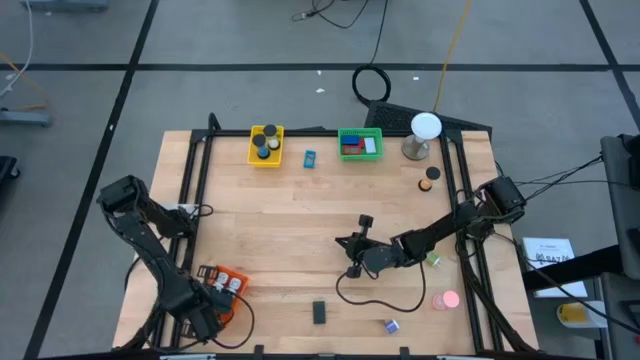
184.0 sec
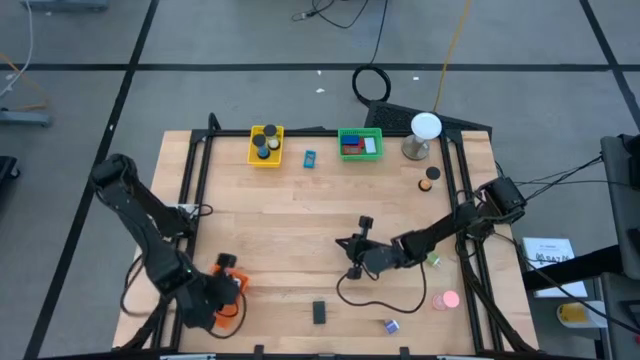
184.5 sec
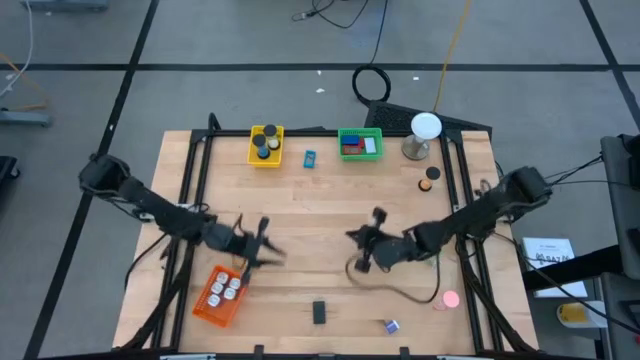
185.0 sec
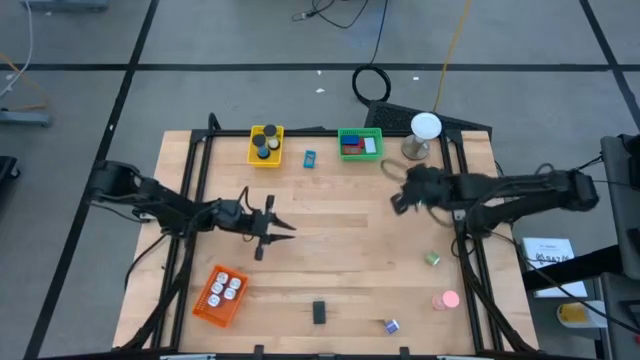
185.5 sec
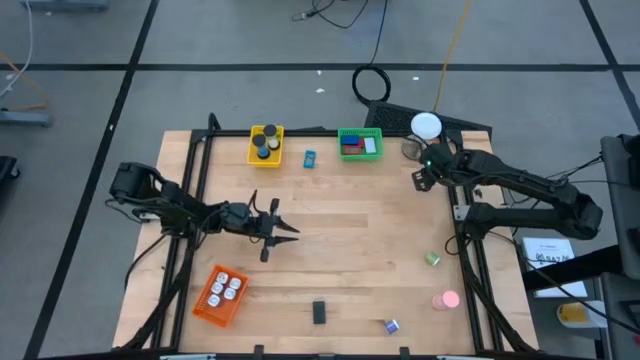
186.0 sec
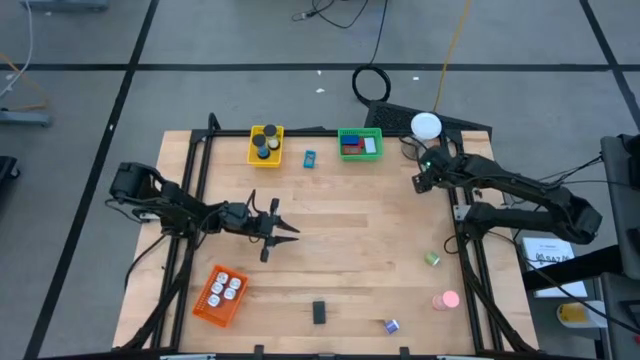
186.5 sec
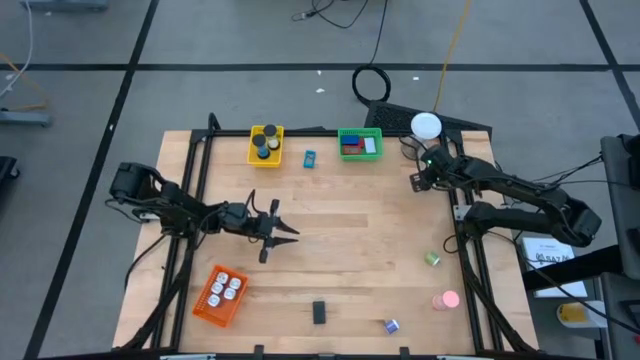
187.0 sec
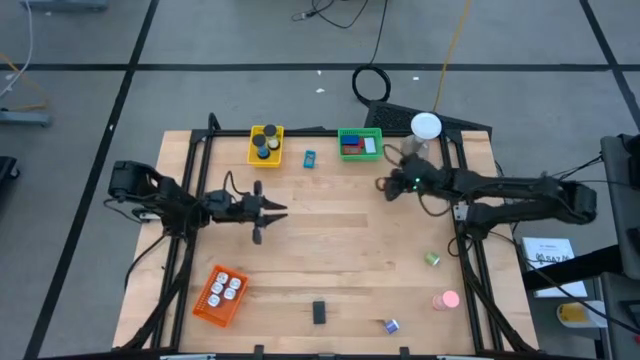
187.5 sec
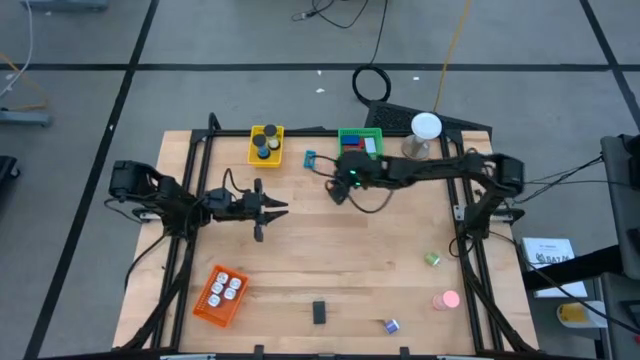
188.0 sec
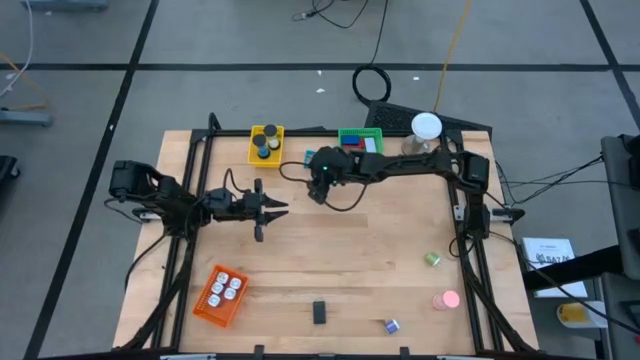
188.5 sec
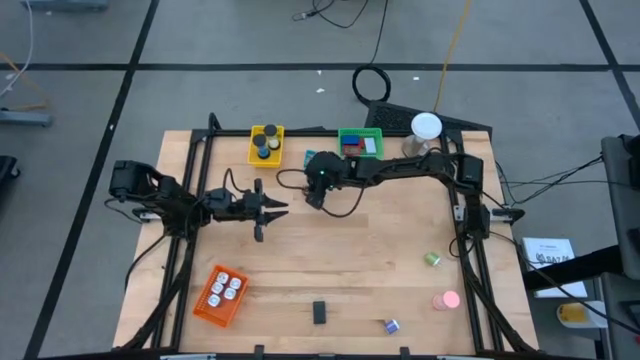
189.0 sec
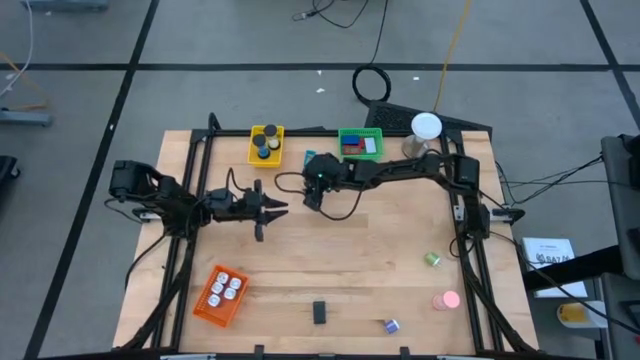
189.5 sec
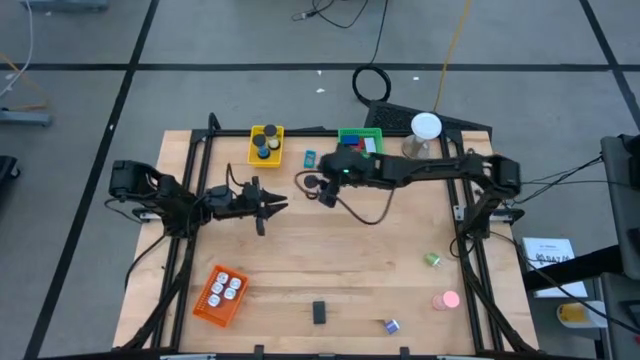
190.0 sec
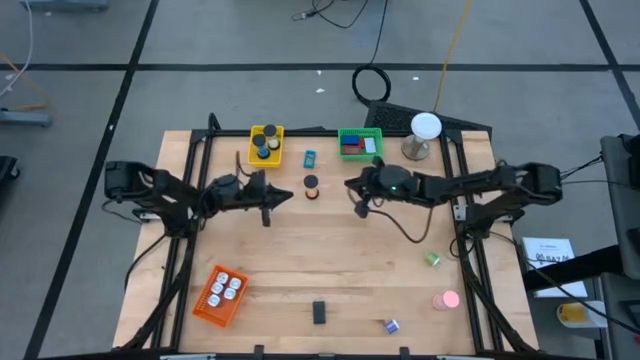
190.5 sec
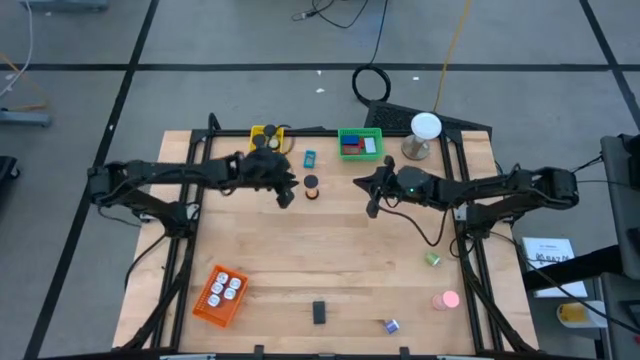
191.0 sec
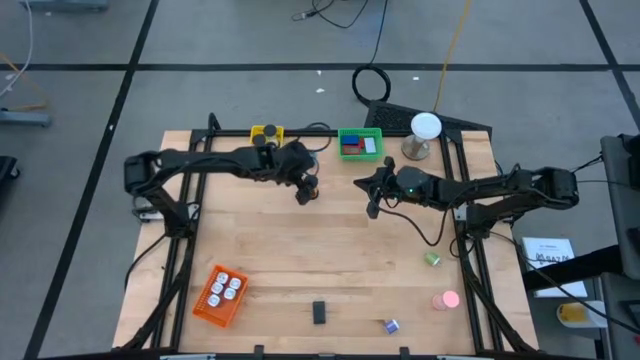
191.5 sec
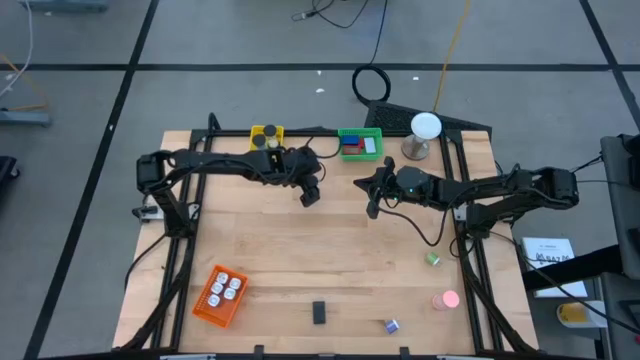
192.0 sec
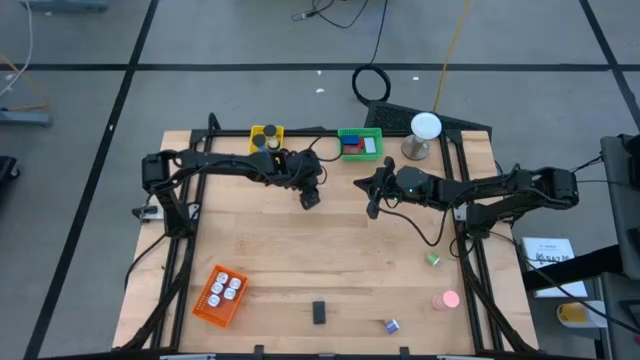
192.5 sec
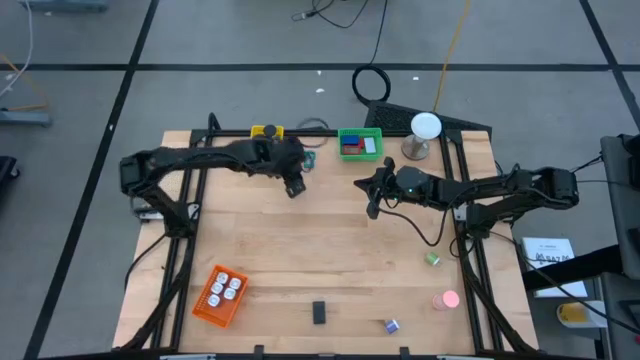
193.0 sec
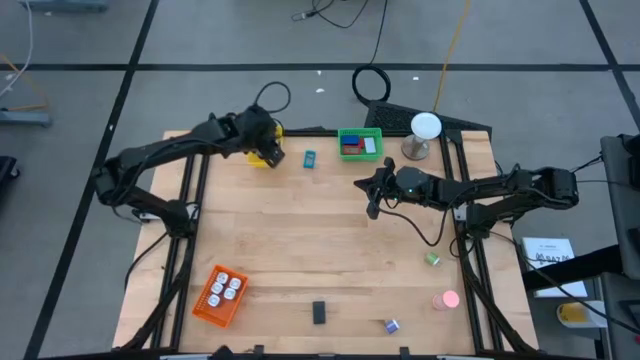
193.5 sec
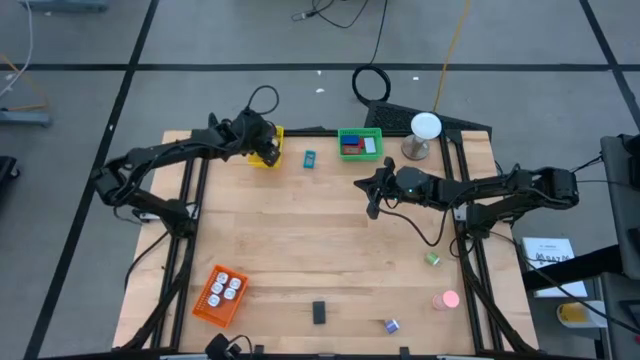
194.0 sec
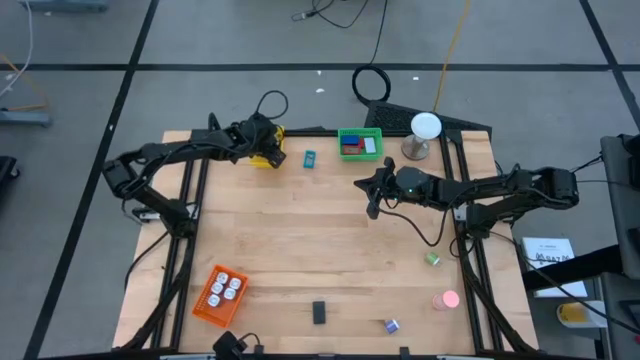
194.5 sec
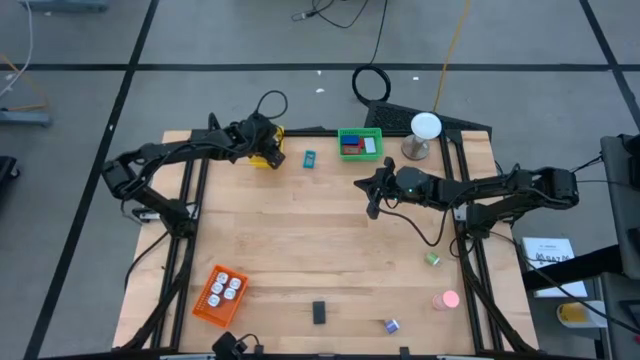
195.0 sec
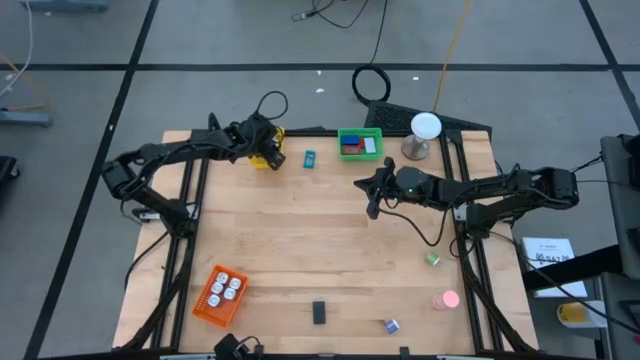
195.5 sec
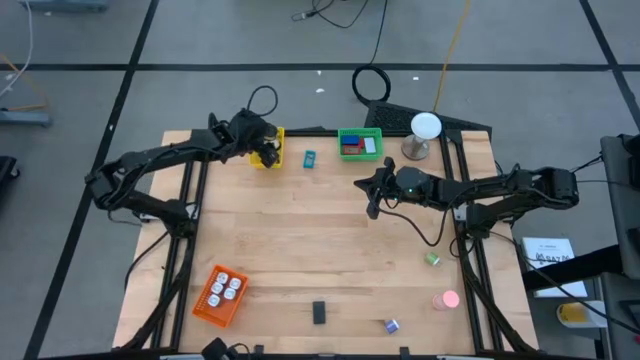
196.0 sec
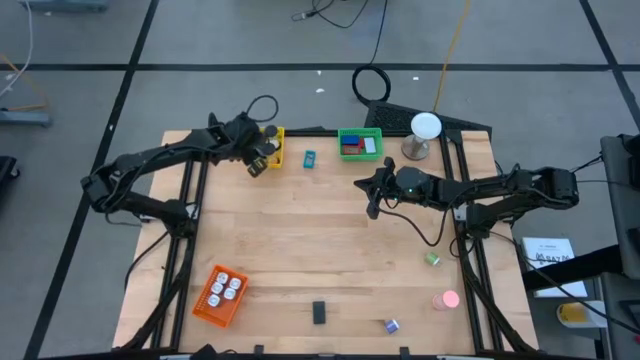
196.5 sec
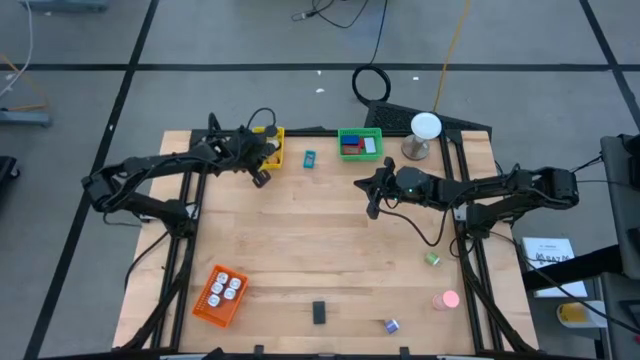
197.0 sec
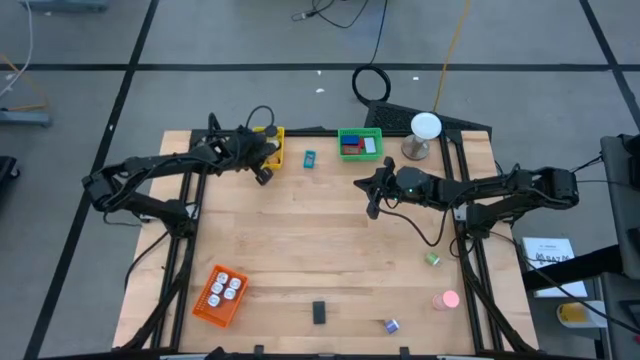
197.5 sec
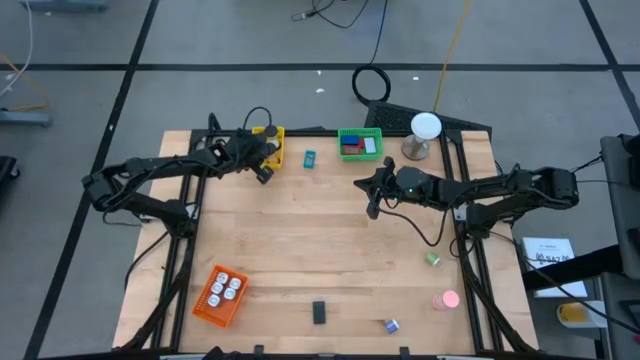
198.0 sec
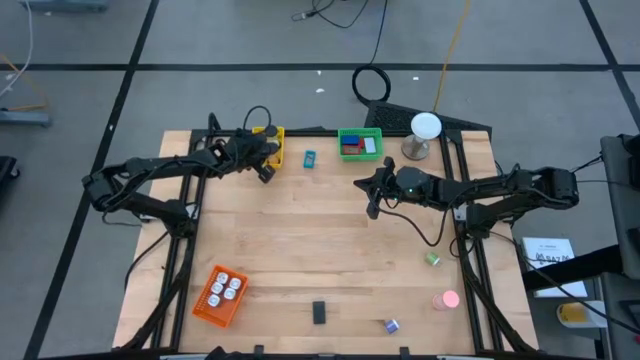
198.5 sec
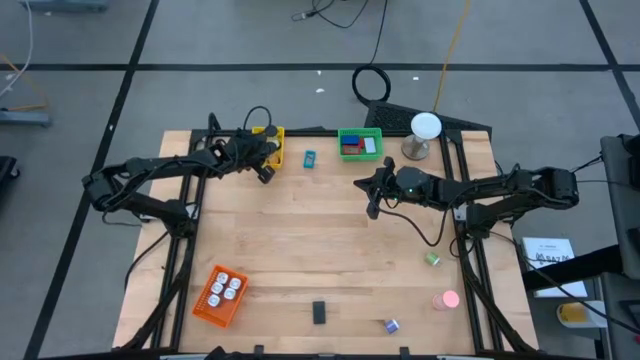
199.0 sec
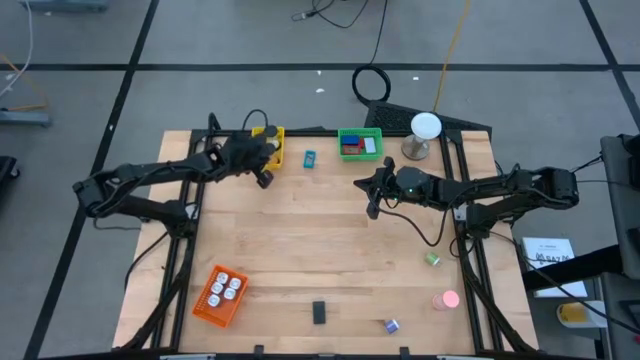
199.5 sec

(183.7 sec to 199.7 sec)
Task: Pick & Place Office items
Put the orange hourglass into the yellow bin

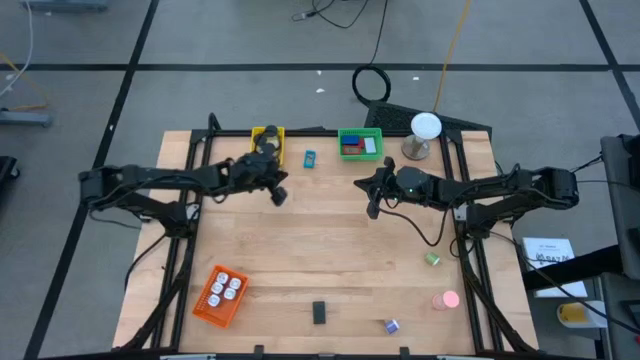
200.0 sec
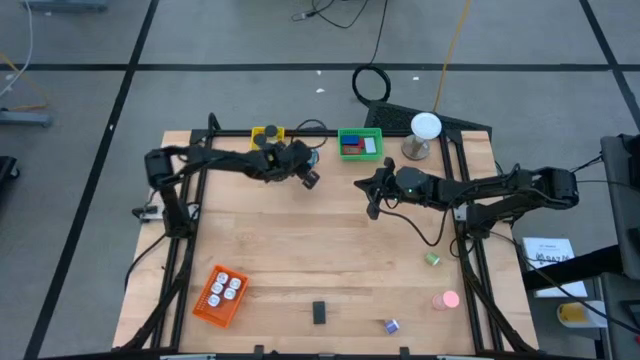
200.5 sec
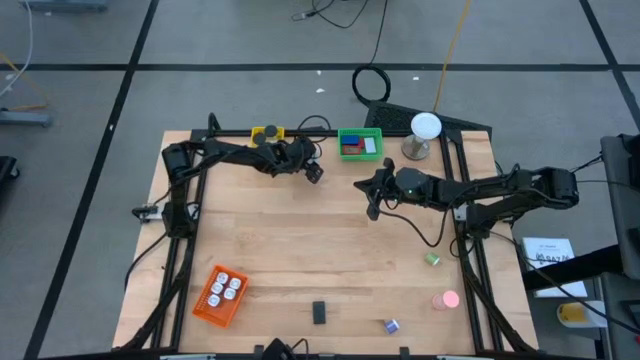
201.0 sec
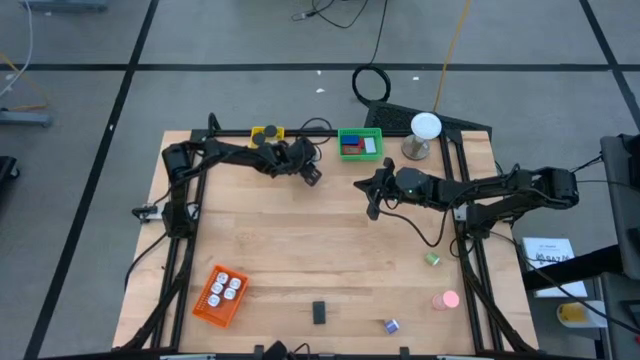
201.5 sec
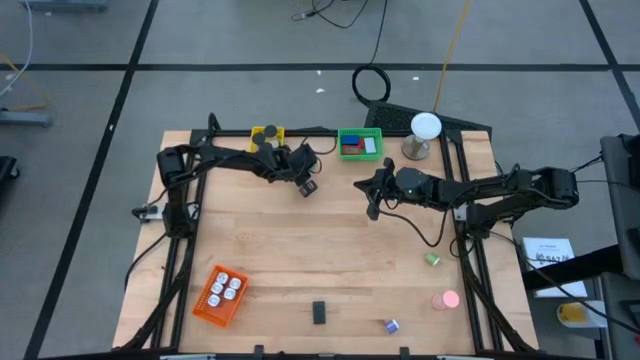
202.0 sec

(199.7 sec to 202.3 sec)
Put the light blue digital clock into the green bin
